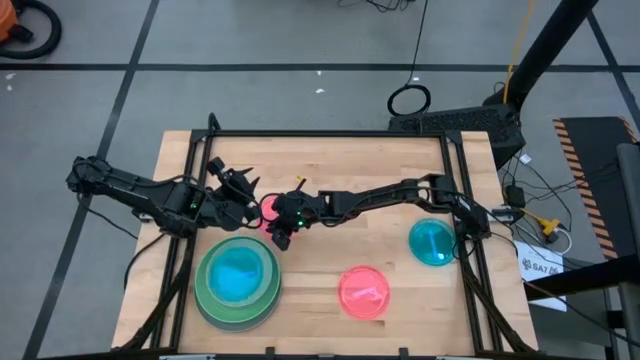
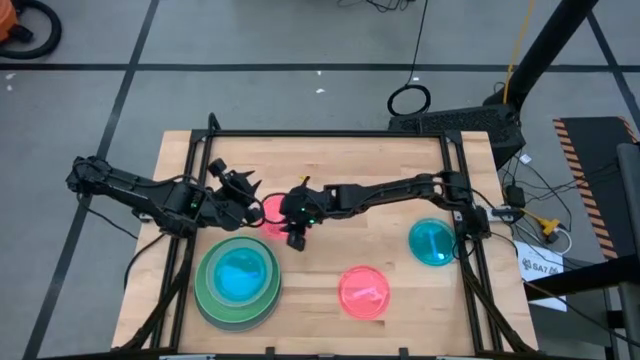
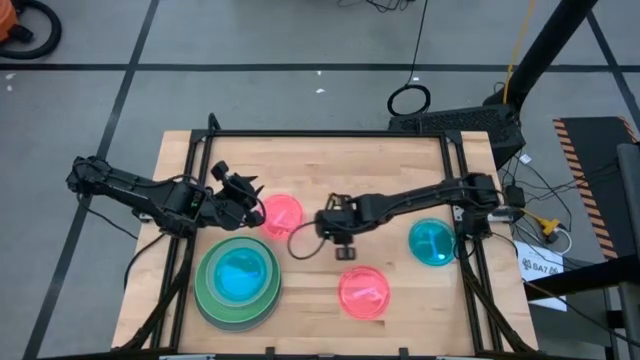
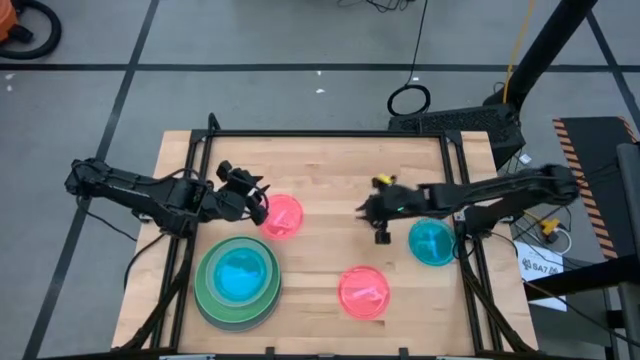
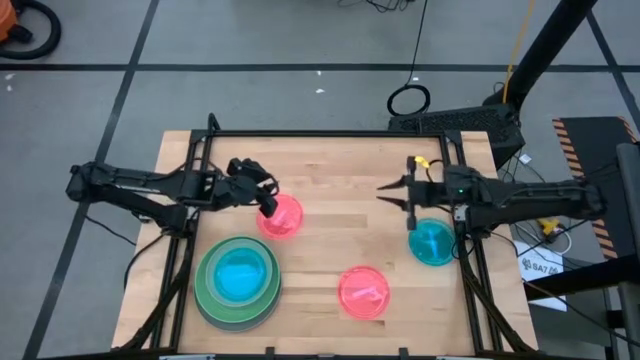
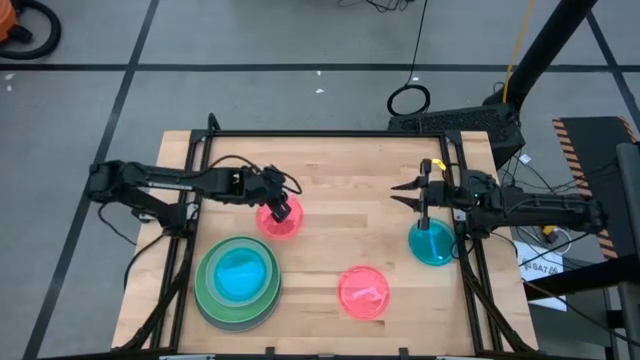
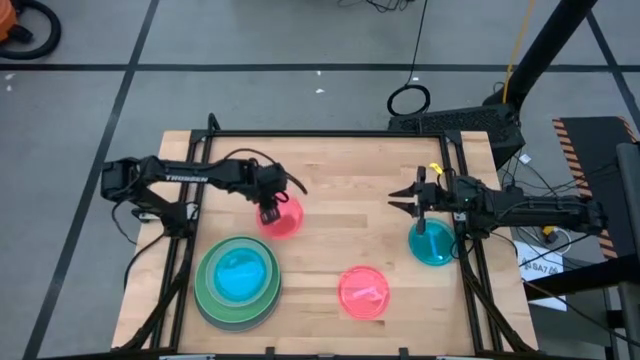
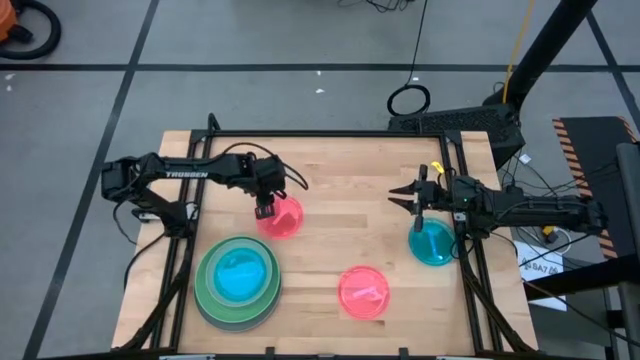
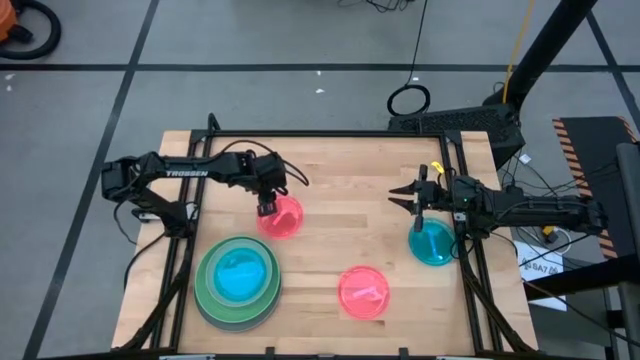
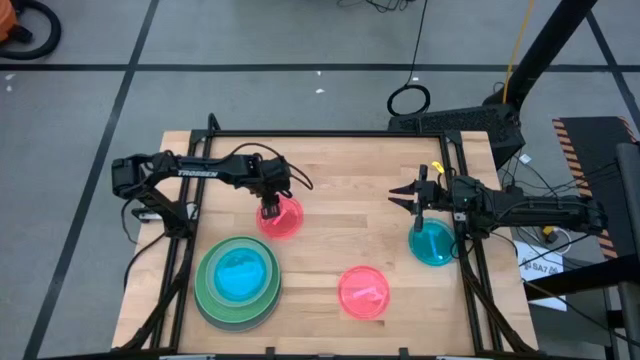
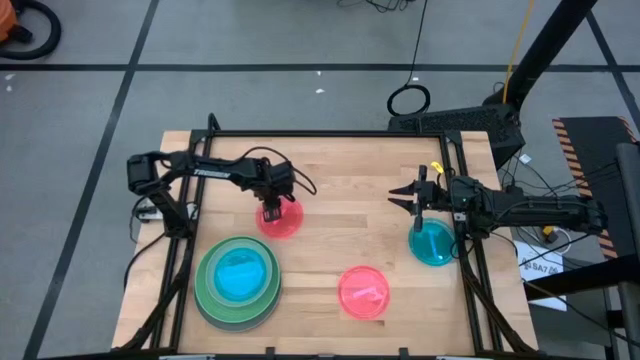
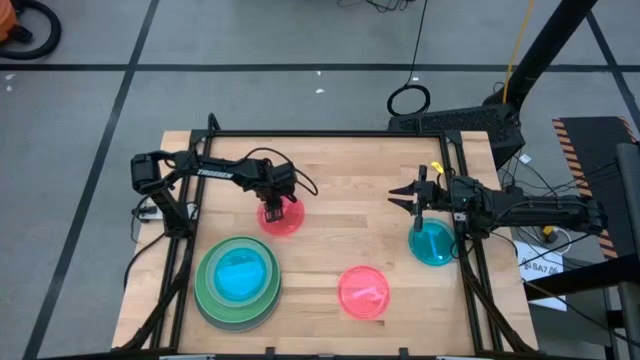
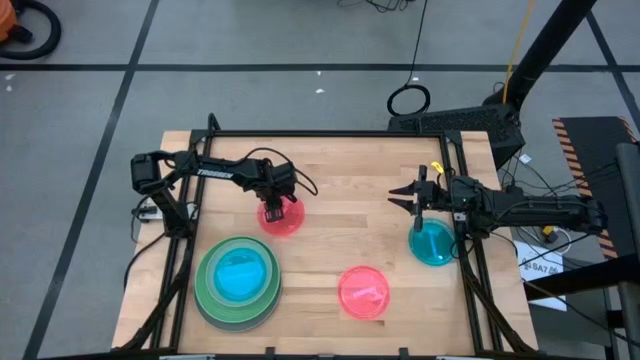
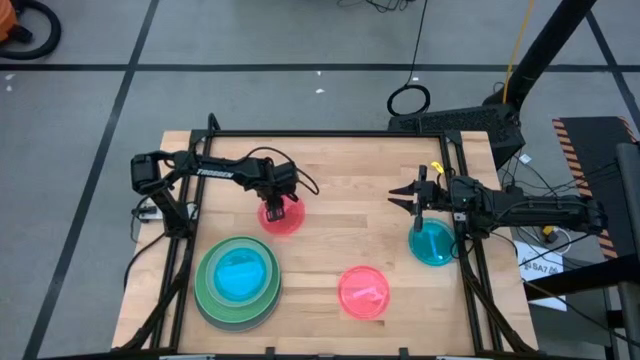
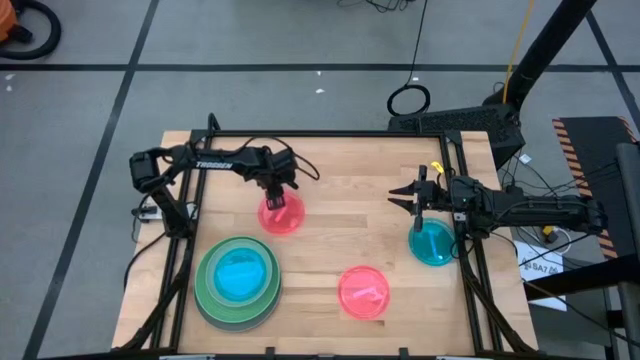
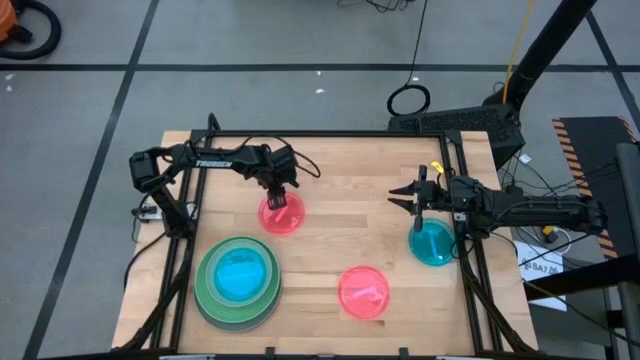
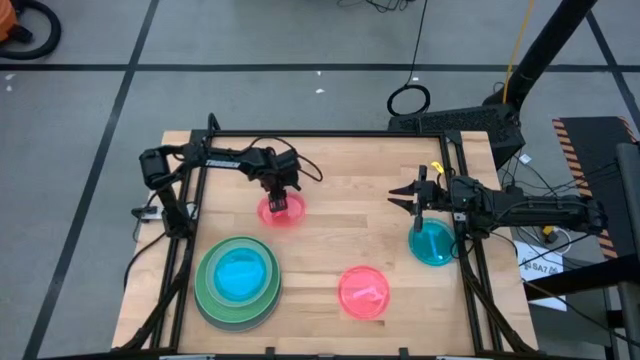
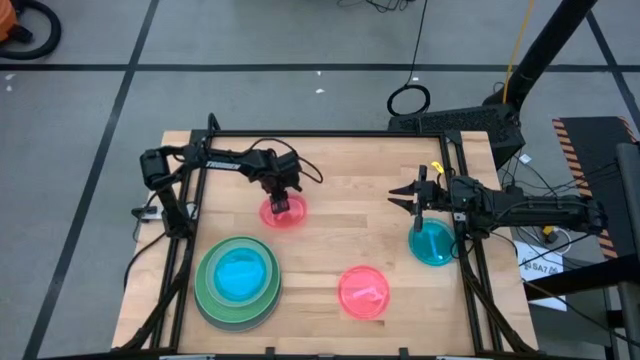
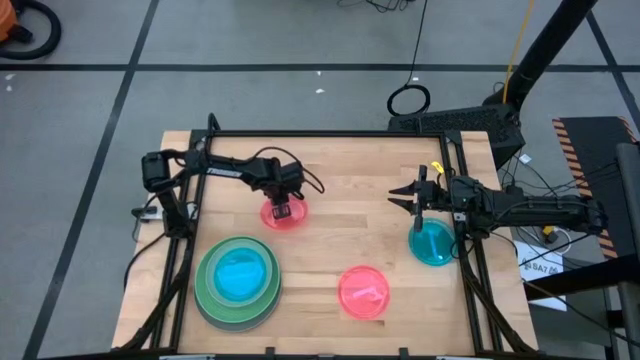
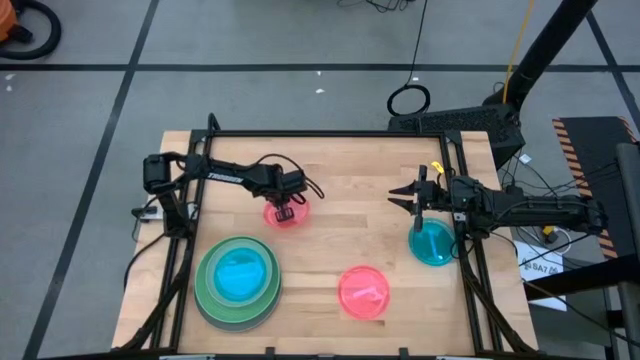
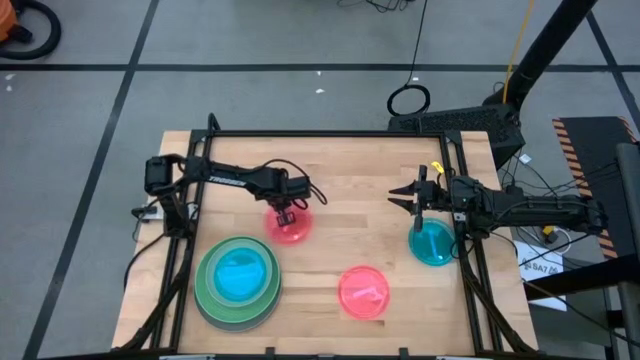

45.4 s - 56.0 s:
Task: Stack plastic plates
Stack the top pink plate on the transparent blue plate

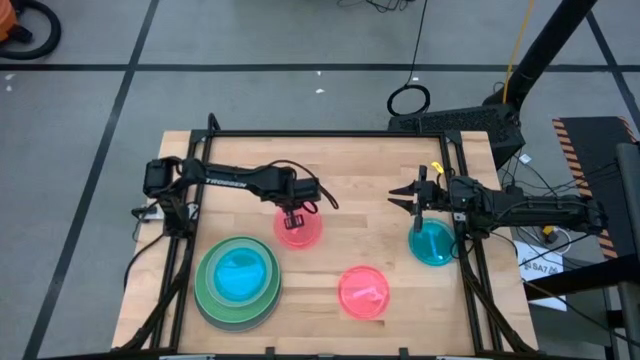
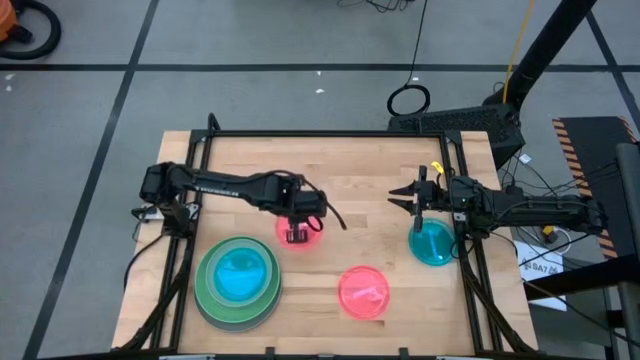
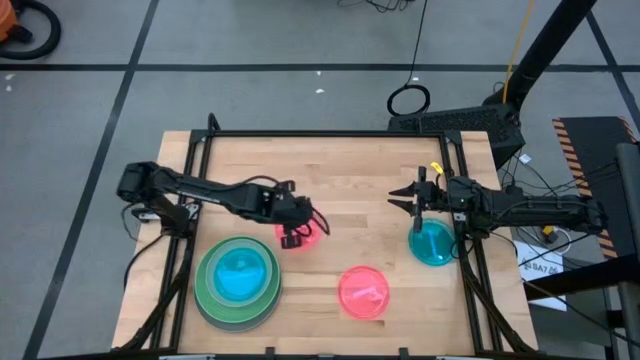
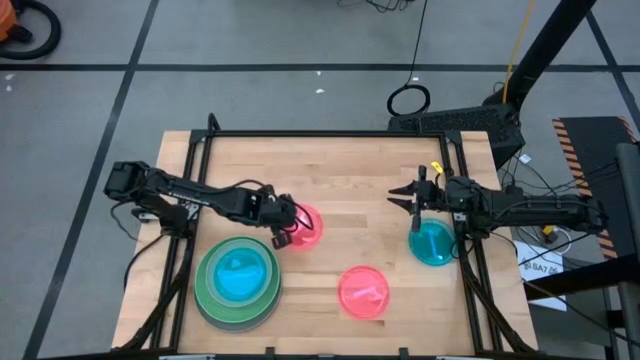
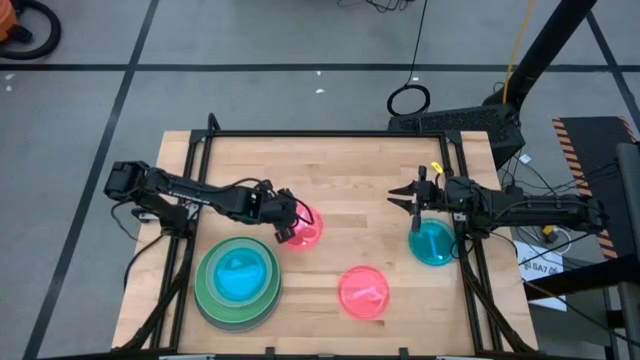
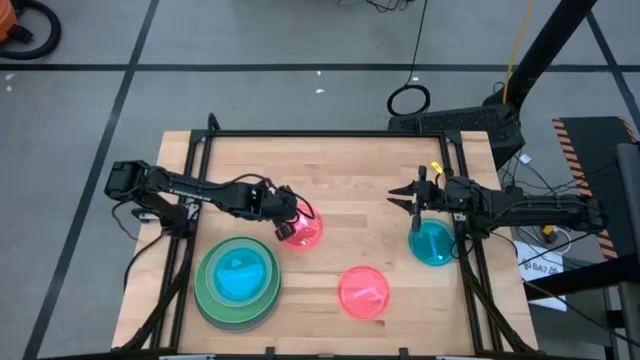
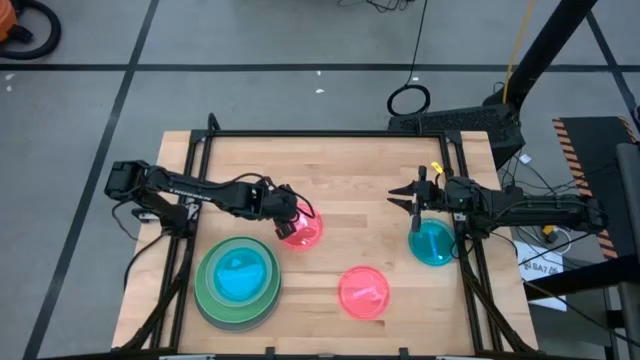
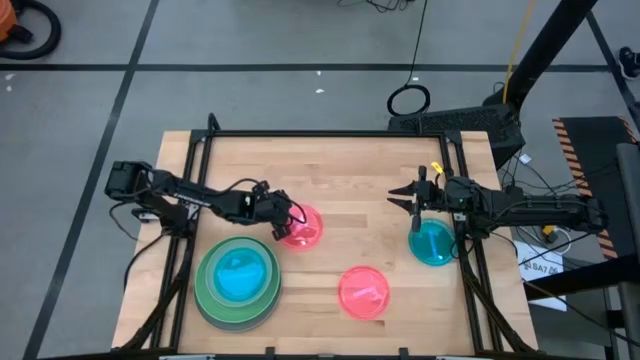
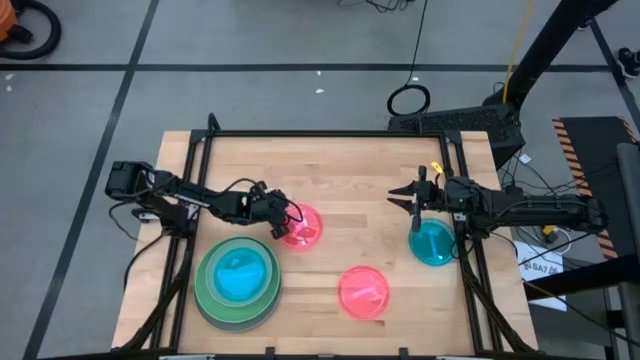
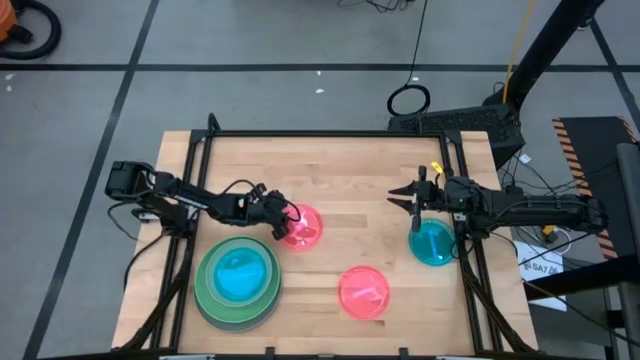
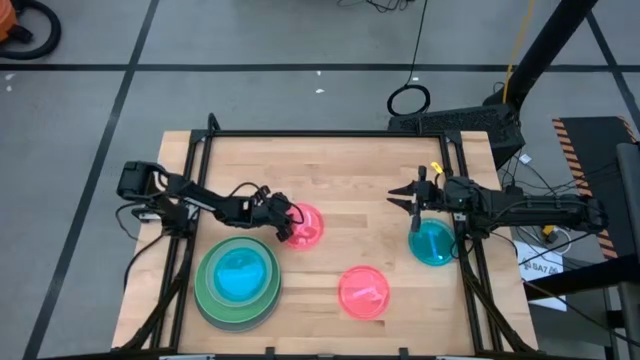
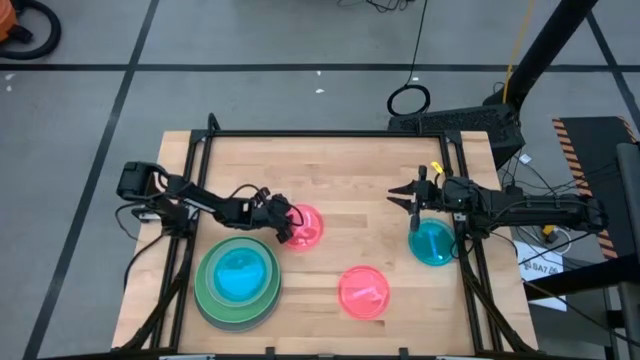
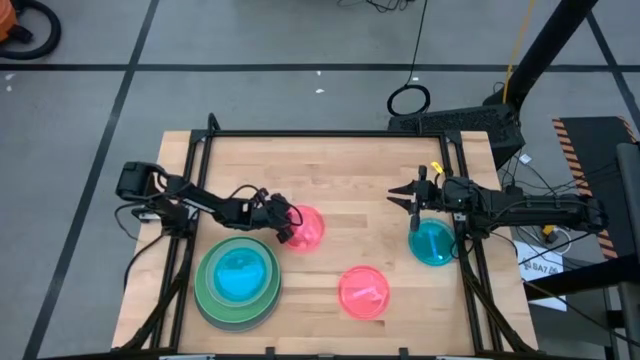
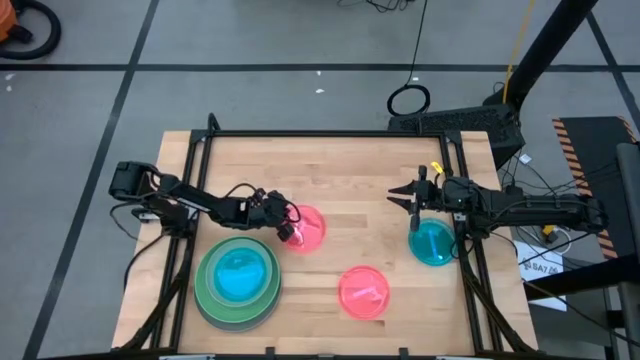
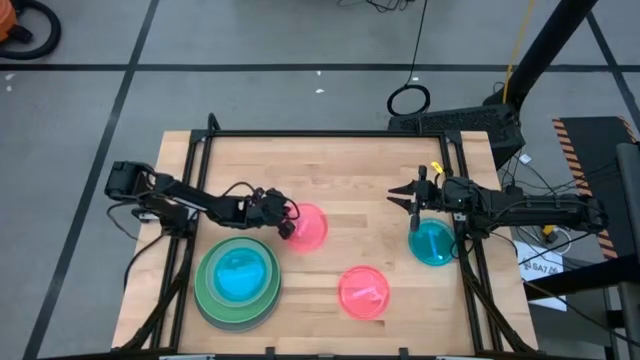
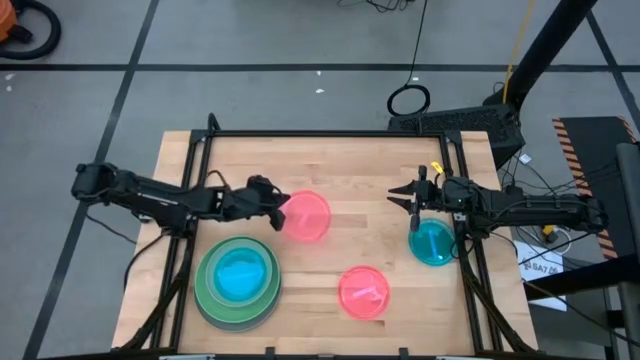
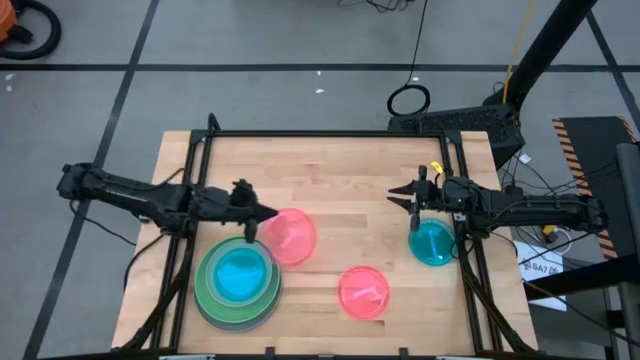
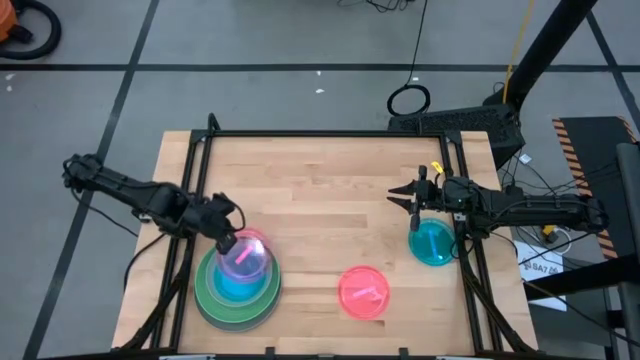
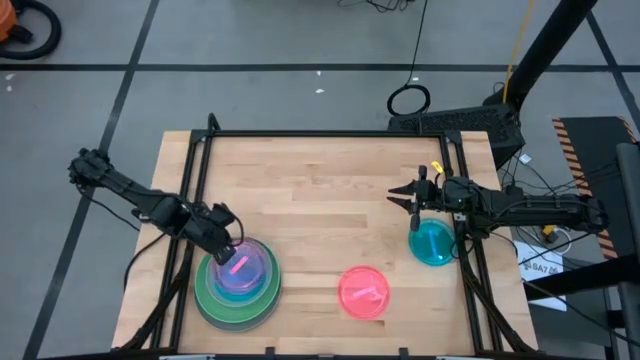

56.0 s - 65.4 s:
Stack the top pink plate on the transparent blue plate
